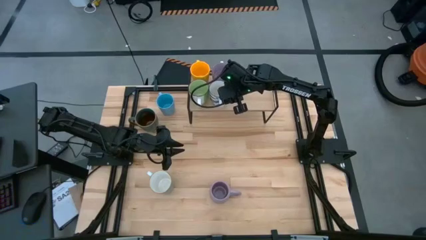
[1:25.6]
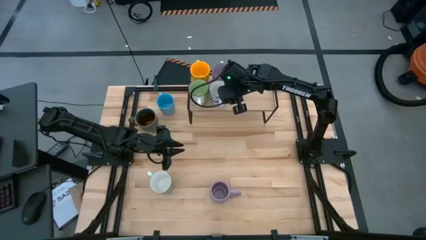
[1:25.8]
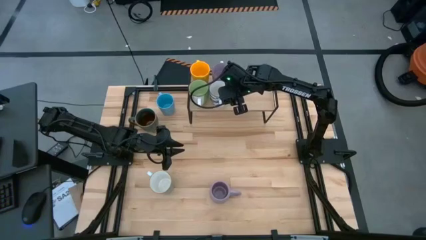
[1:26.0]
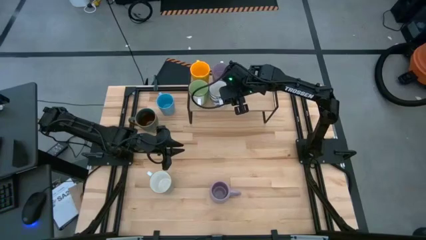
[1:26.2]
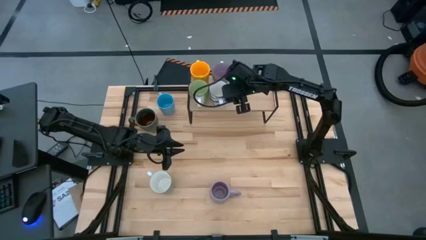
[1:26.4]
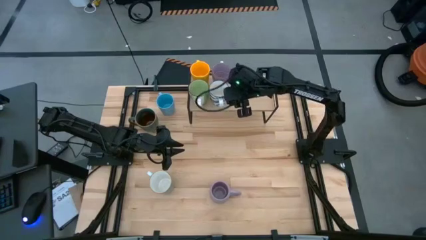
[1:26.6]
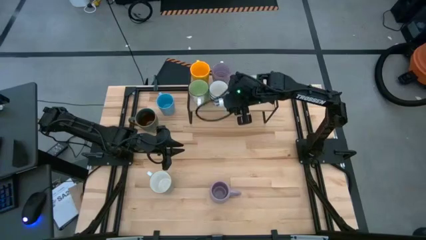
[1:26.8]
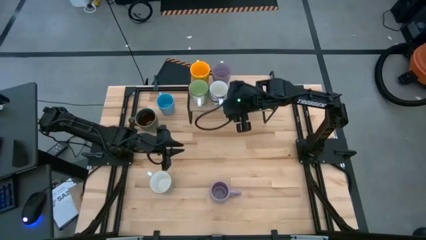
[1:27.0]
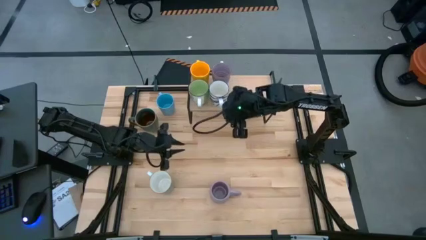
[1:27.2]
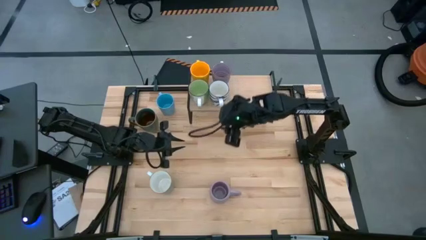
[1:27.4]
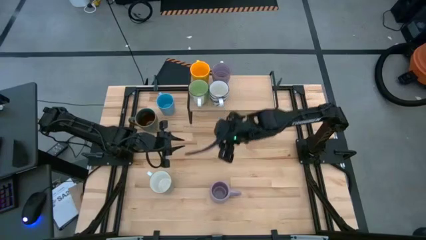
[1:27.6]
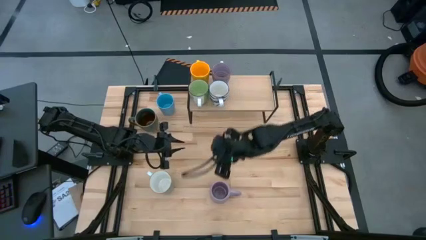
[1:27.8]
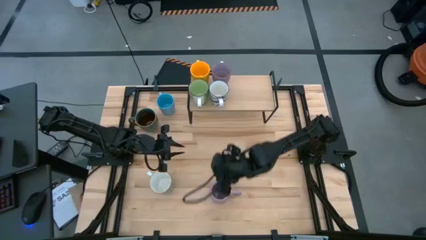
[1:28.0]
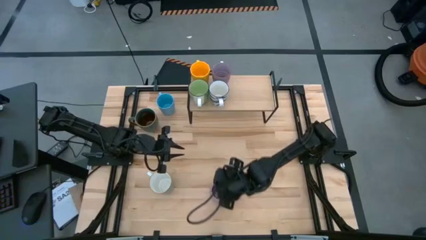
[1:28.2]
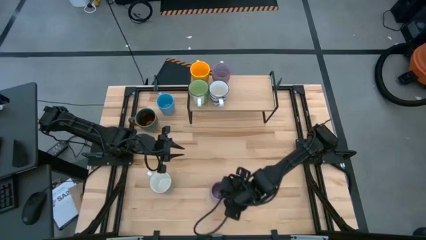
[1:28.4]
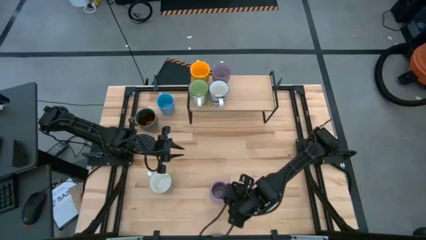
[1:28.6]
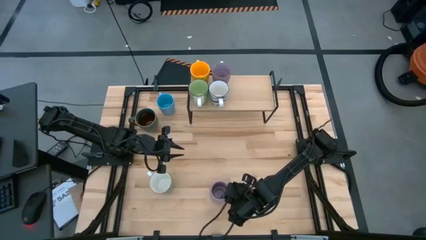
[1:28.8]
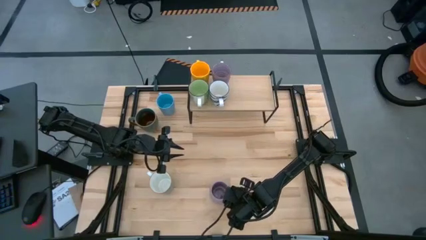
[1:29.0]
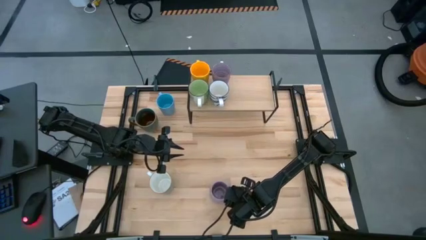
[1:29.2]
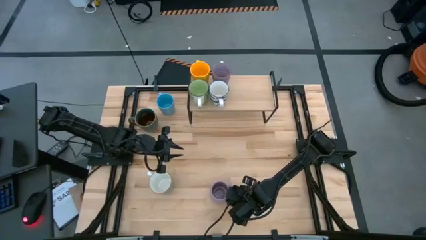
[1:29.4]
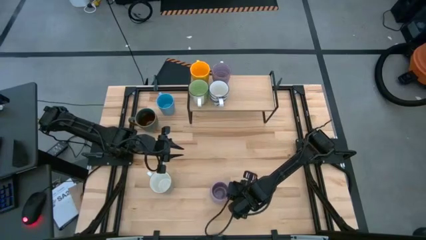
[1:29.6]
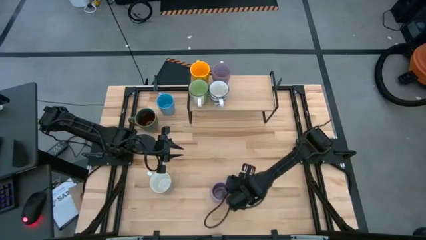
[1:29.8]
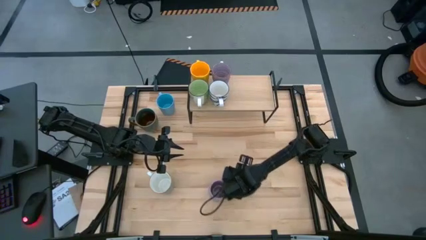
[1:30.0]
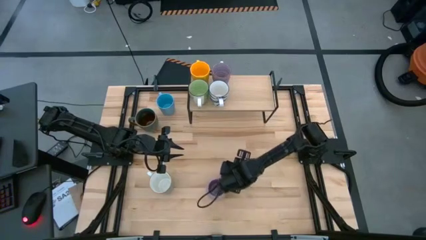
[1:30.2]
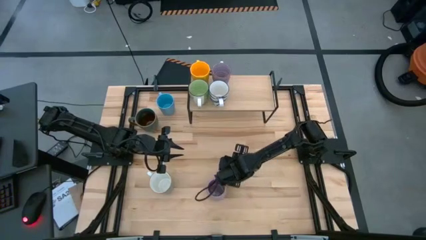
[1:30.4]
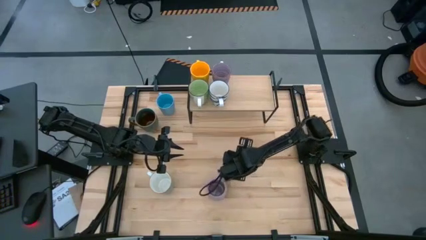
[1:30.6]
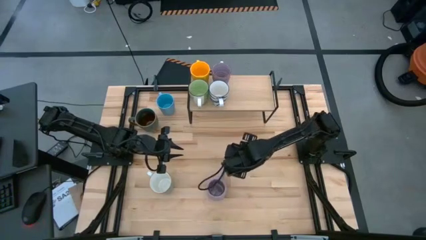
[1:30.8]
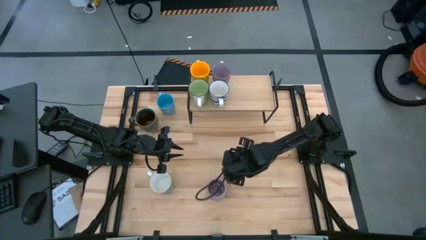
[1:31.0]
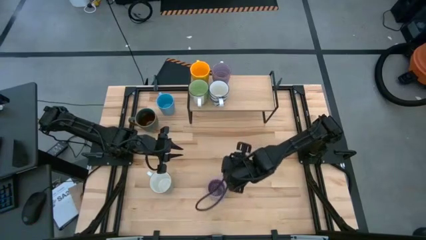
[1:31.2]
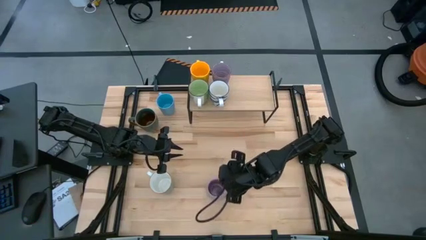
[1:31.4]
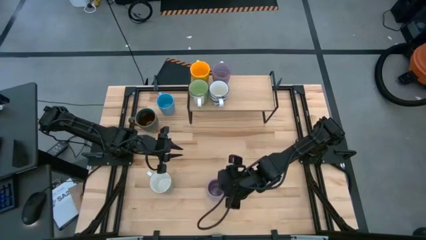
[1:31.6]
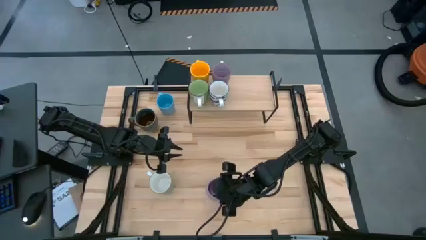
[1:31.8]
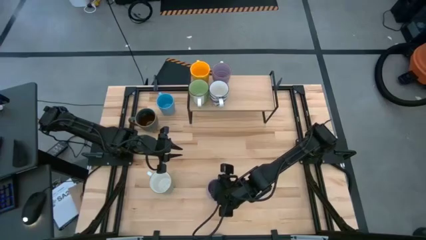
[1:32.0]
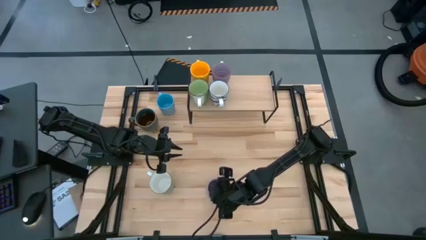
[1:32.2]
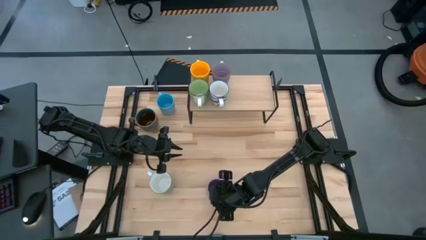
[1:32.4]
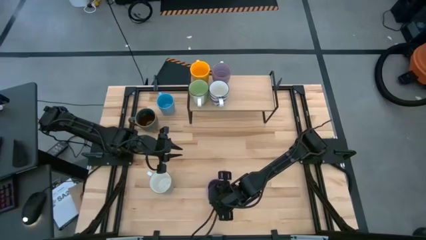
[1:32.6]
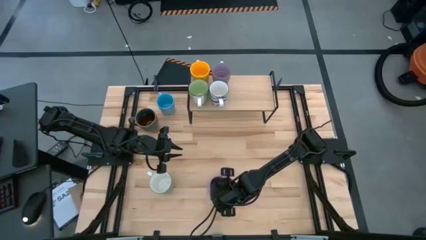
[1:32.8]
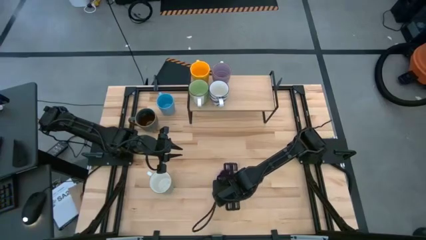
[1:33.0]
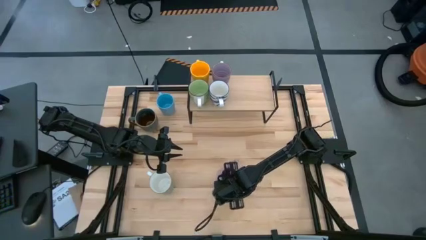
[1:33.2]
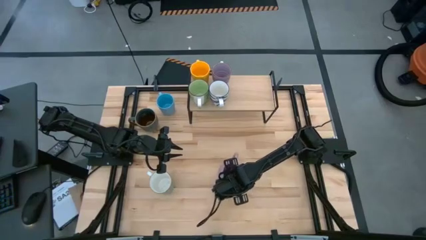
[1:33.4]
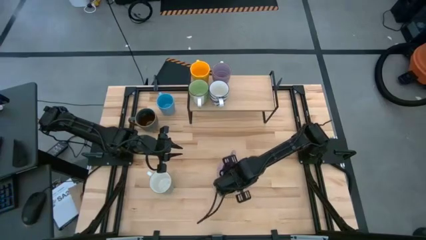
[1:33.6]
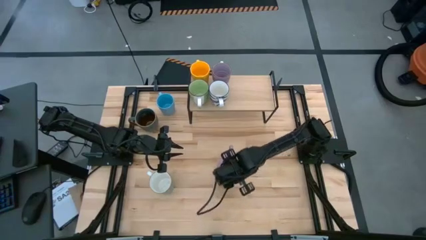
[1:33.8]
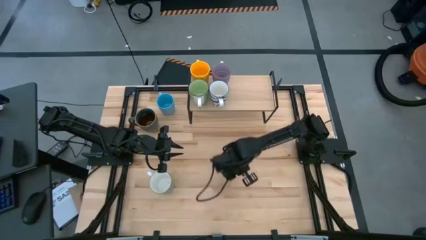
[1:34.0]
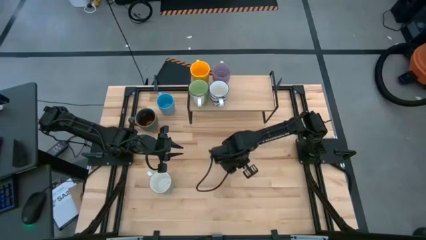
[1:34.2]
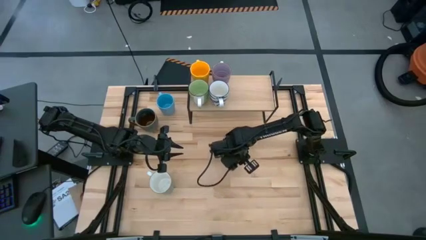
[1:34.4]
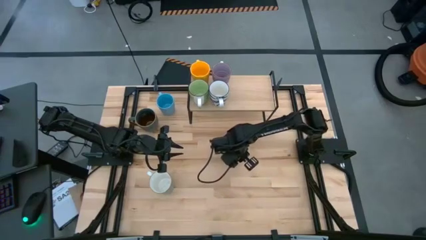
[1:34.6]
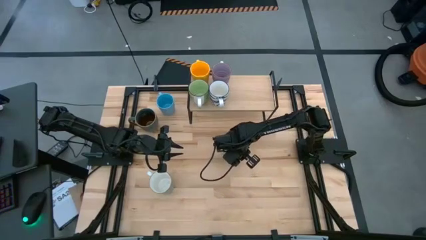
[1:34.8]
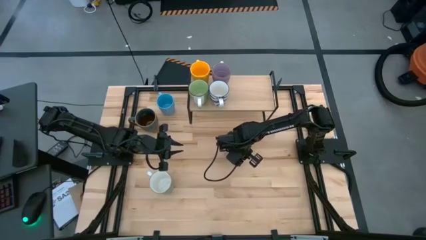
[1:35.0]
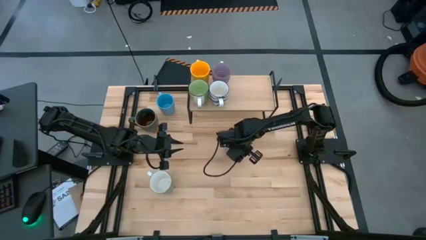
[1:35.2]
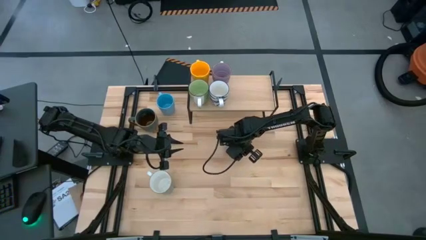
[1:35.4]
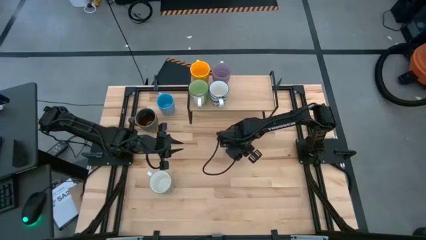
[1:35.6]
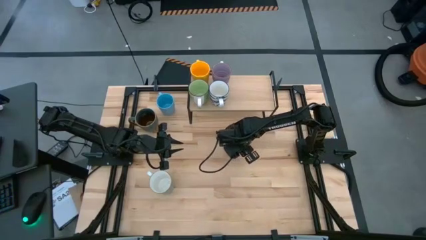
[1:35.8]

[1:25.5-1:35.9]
Task: Place coffee mugs
Put the purple mug on the shelf
